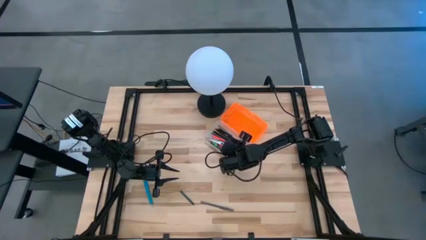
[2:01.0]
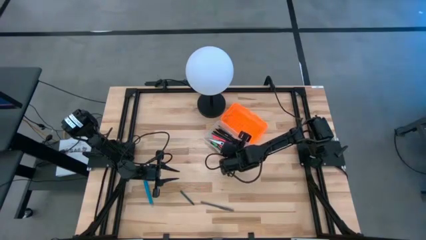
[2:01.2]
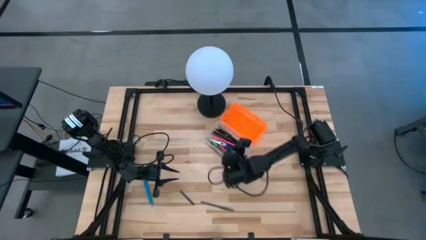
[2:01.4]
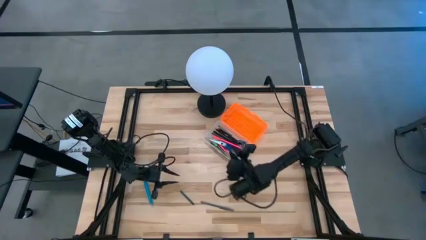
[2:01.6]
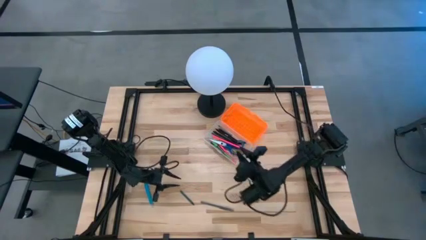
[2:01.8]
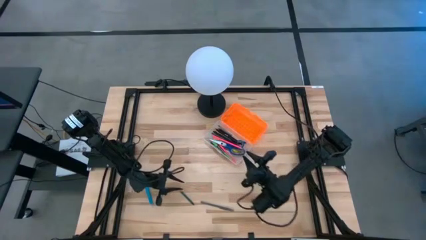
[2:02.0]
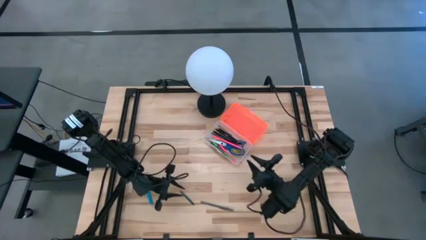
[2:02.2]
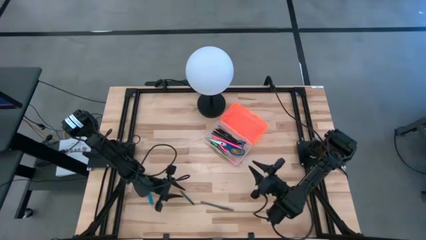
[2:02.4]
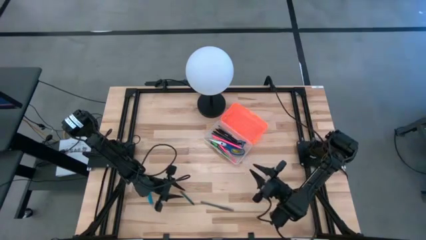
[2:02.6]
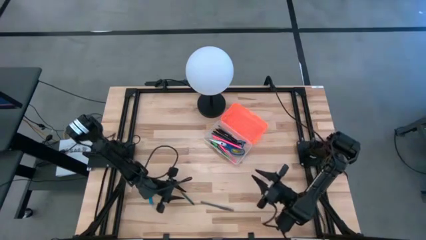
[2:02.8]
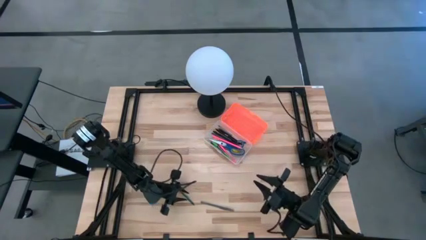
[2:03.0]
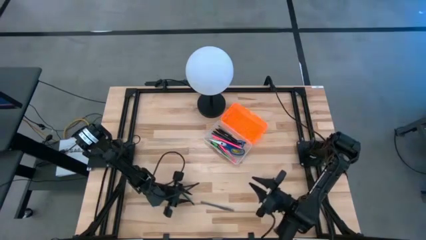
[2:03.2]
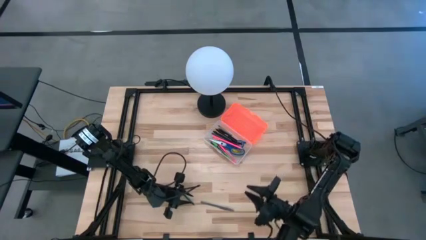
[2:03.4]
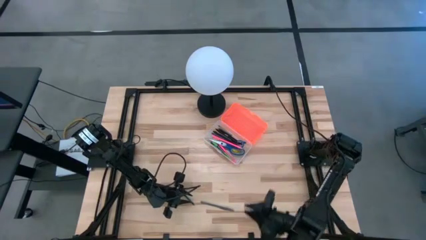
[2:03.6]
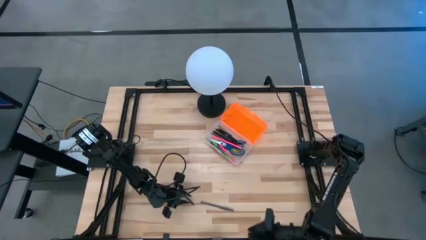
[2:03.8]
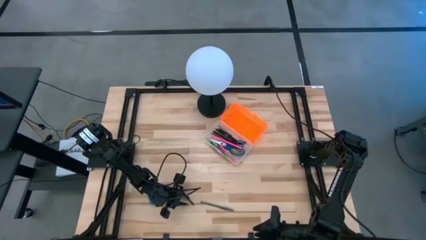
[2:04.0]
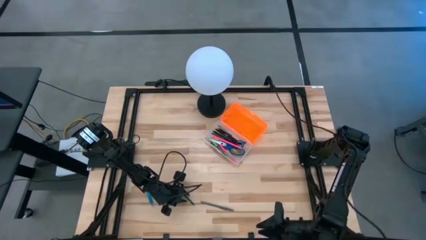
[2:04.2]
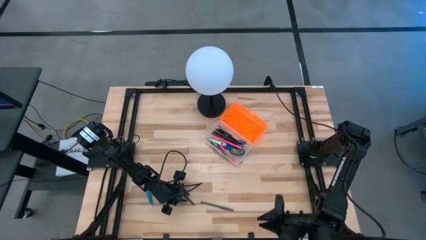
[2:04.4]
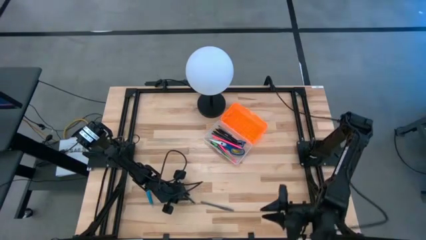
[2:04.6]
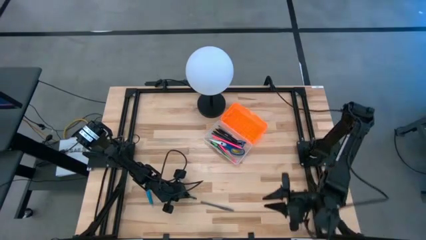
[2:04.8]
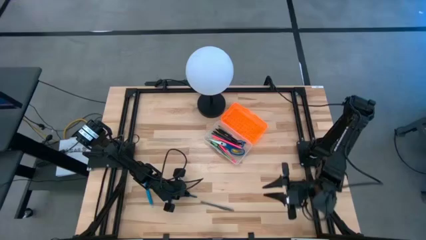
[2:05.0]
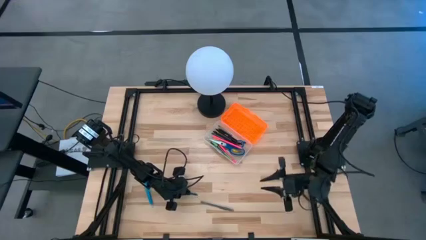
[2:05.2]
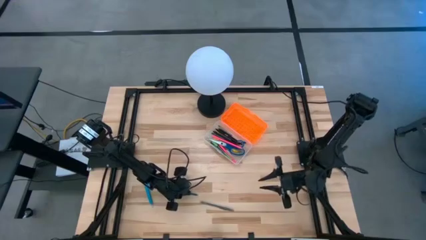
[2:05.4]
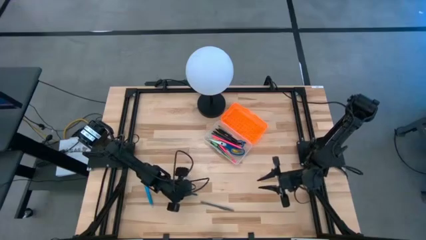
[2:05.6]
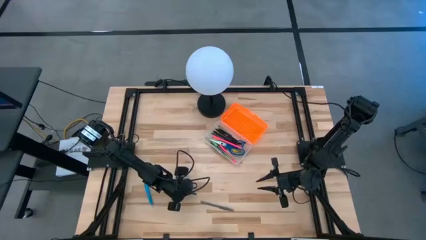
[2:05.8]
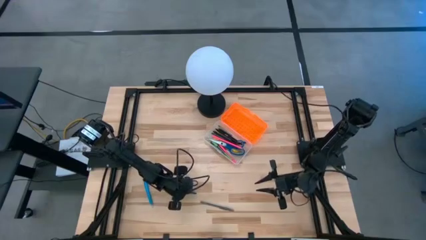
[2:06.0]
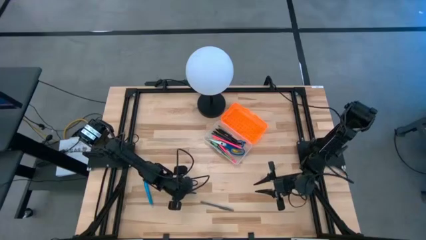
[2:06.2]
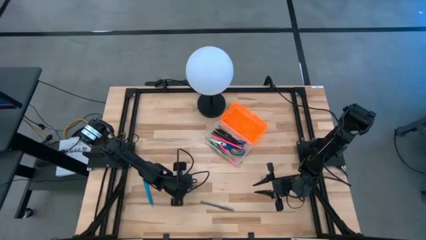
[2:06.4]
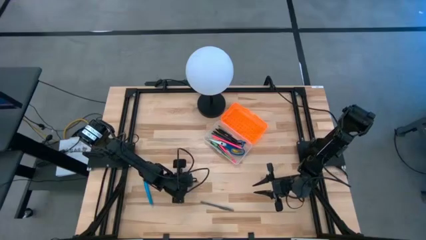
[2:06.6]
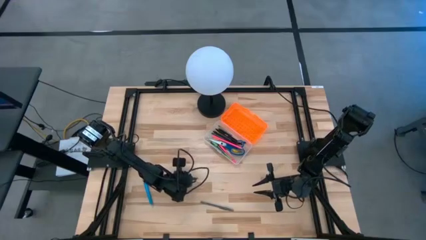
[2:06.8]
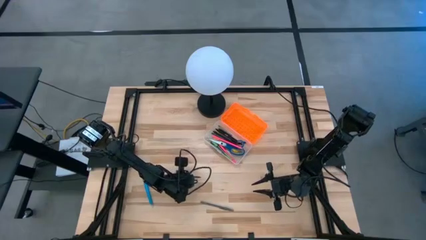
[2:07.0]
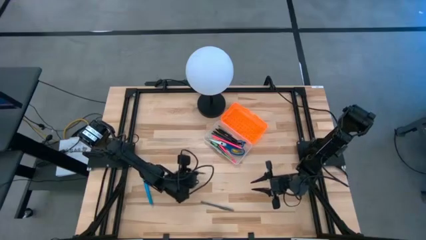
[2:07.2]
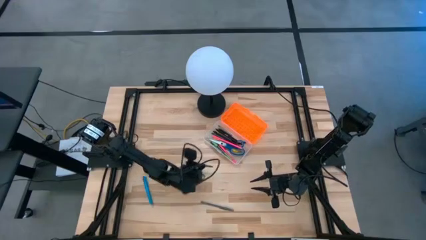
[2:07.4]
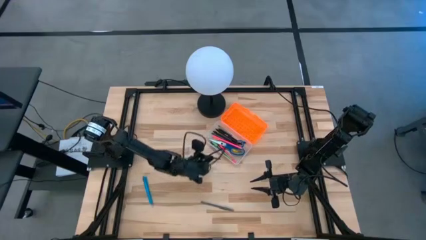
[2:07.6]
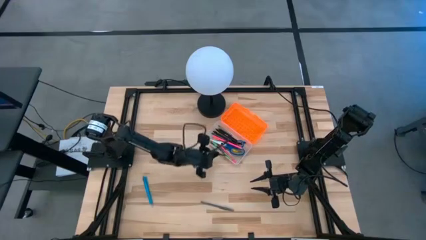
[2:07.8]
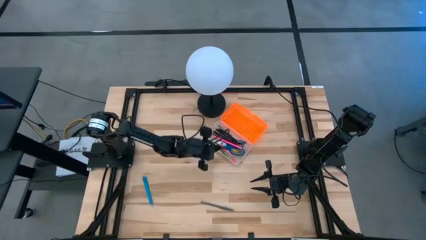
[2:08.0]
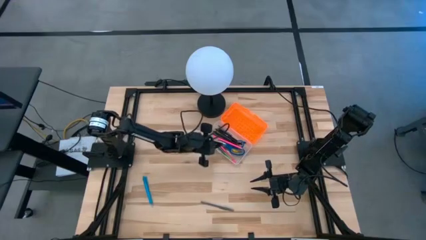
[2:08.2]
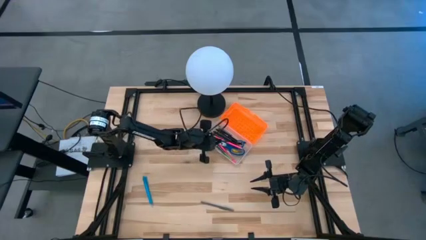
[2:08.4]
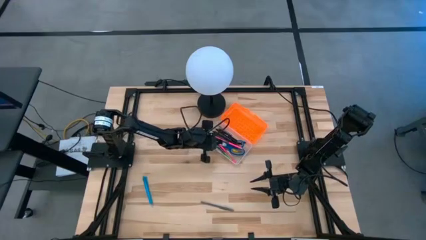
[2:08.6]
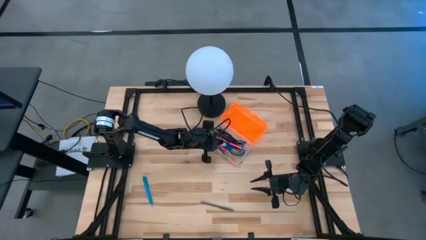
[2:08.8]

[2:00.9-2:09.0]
Task: Pick & place school supplies into a supply box
Put the dark green crayon into the orange supply box

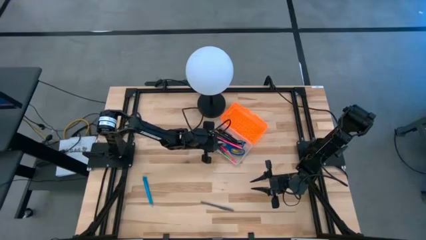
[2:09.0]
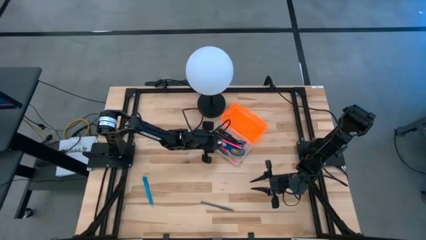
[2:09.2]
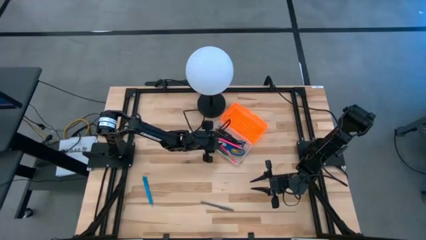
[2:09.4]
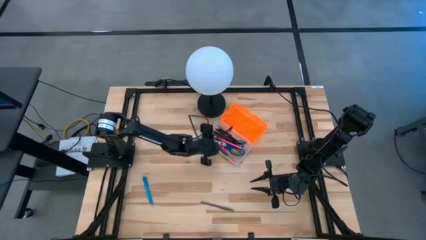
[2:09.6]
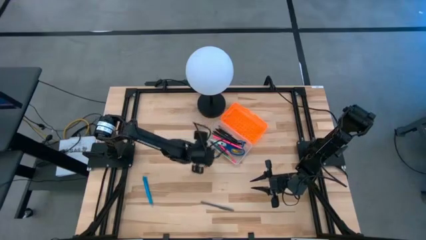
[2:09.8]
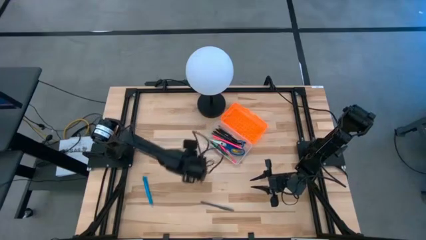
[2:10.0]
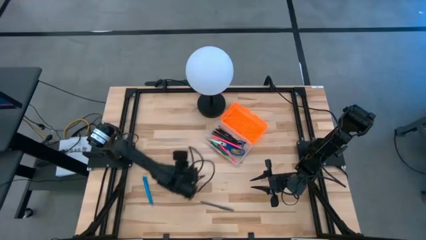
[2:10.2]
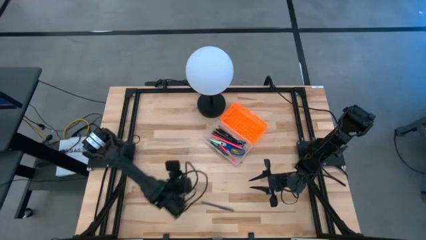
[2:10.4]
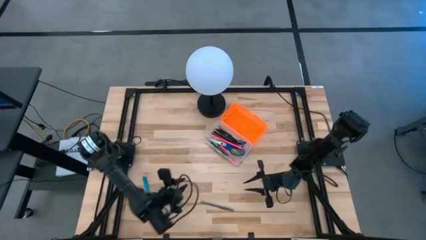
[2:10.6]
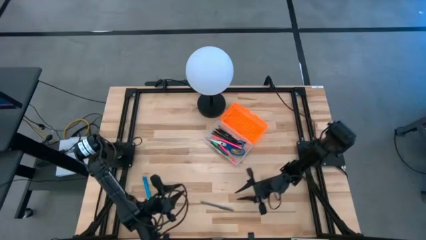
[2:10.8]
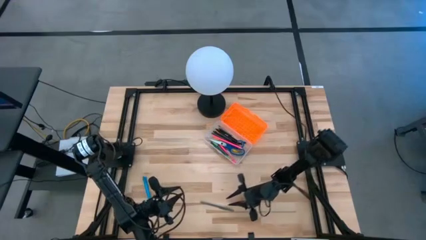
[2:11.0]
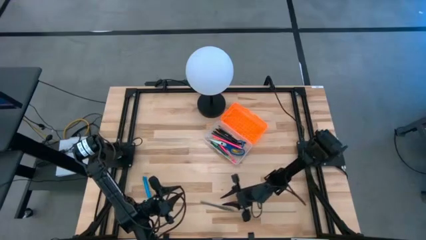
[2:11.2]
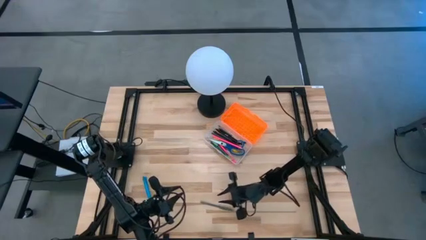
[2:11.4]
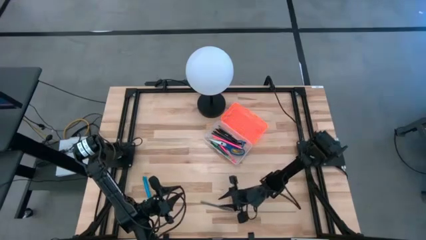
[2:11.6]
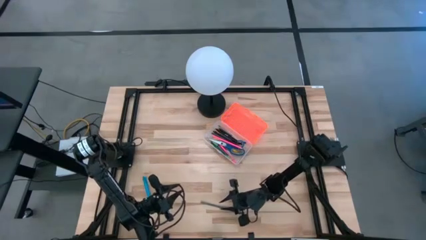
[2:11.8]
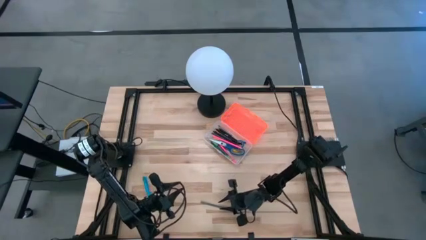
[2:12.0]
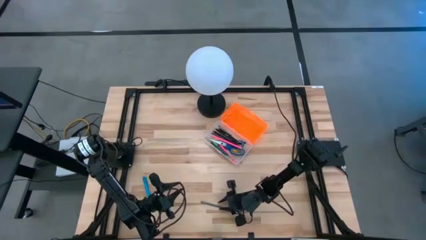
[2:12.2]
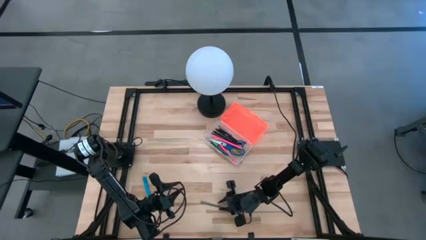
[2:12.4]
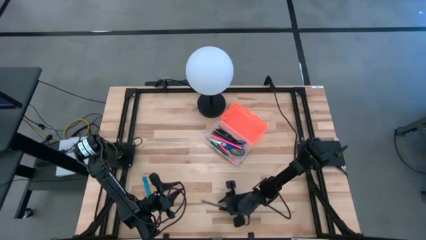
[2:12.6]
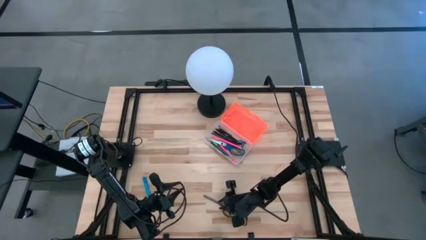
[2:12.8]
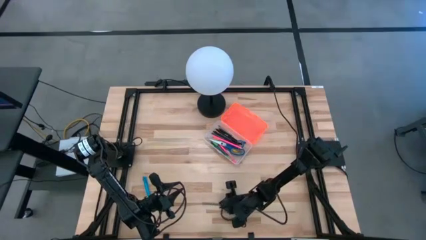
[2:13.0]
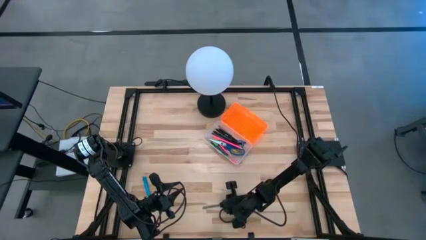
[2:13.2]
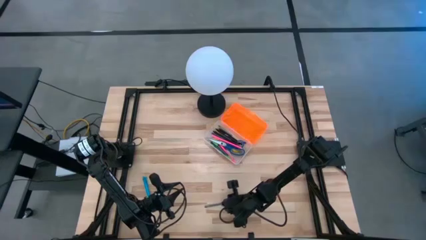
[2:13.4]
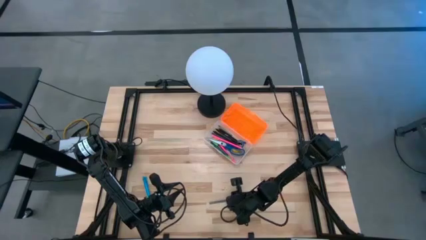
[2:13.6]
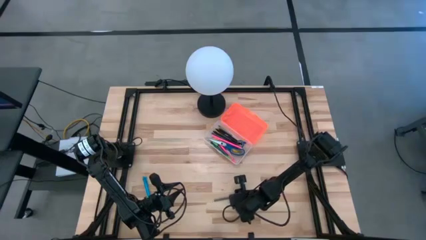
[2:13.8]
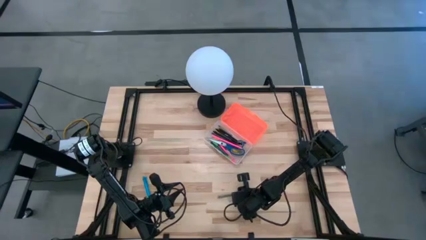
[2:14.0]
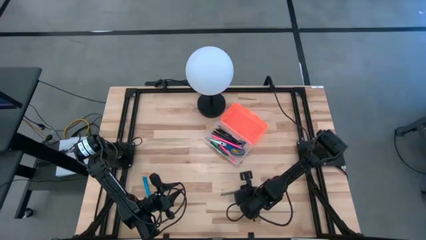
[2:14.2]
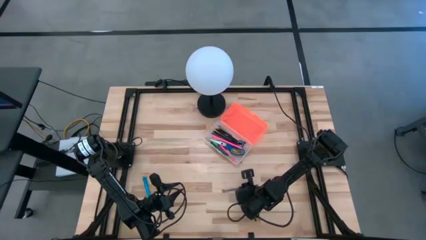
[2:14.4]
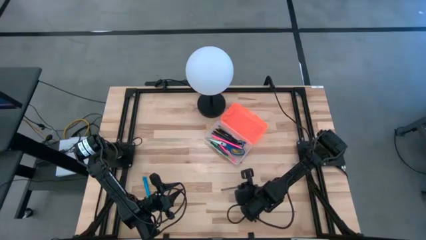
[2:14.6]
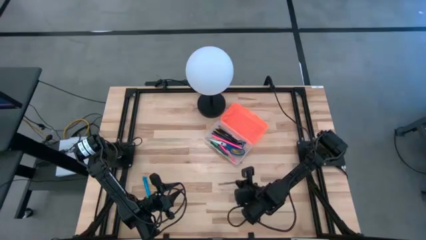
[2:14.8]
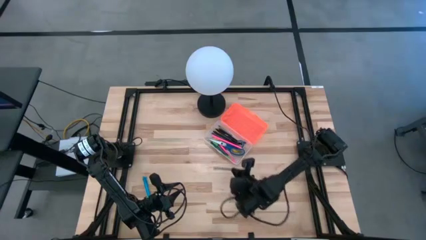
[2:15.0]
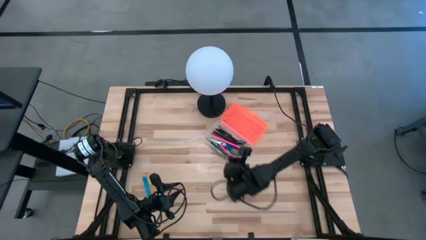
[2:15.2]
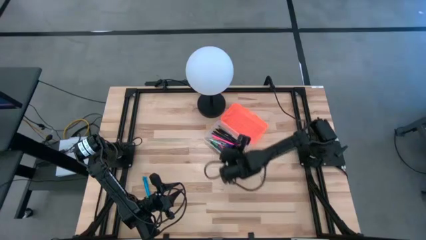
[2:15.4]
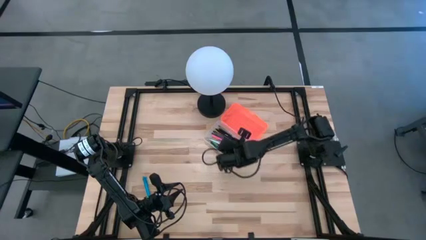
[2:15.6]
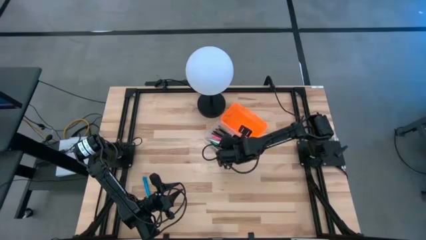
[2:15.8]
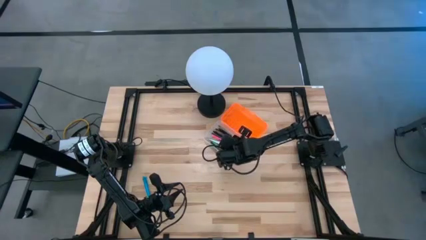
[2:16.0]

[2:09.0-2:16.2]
Put the gray pen into the orange supply box

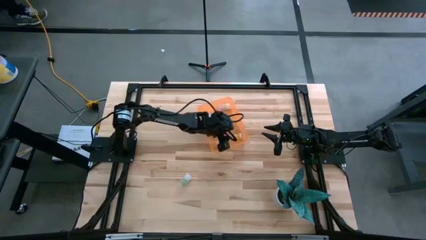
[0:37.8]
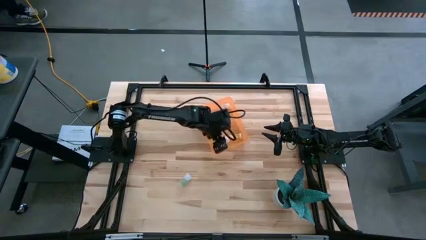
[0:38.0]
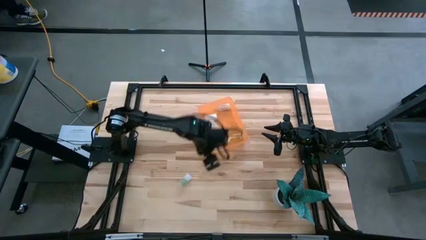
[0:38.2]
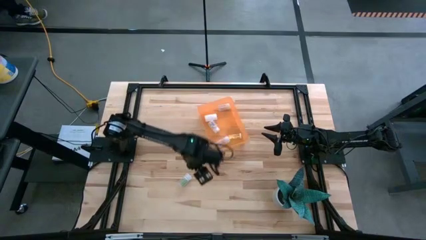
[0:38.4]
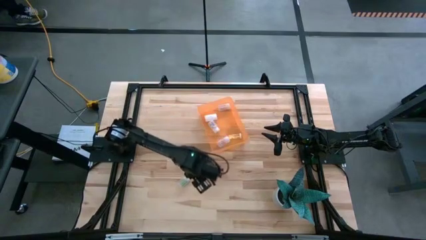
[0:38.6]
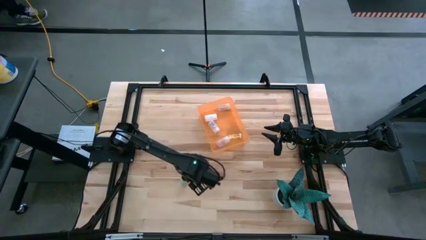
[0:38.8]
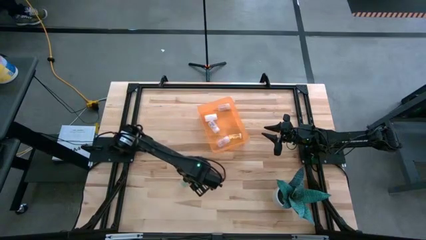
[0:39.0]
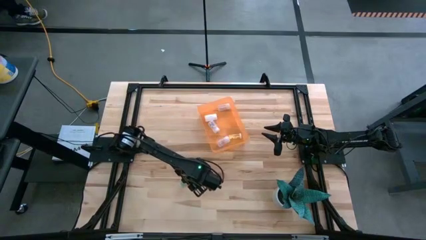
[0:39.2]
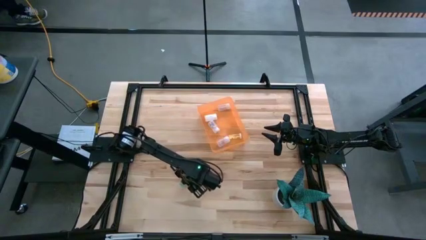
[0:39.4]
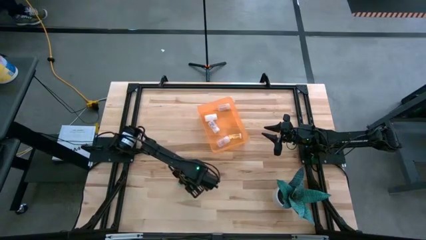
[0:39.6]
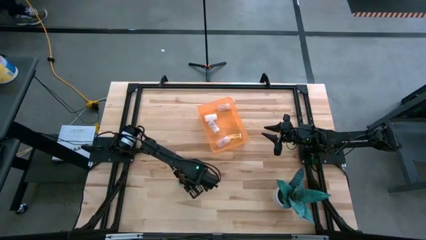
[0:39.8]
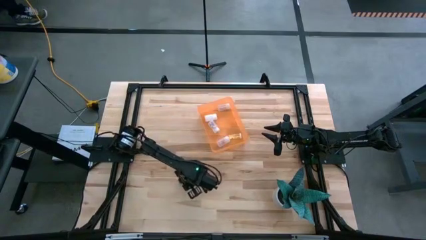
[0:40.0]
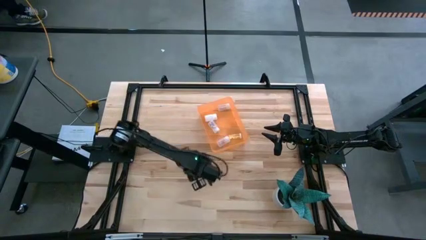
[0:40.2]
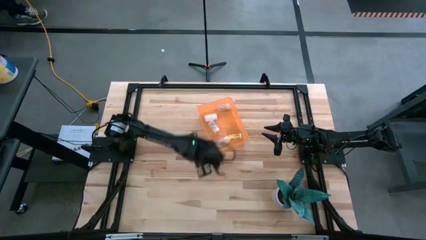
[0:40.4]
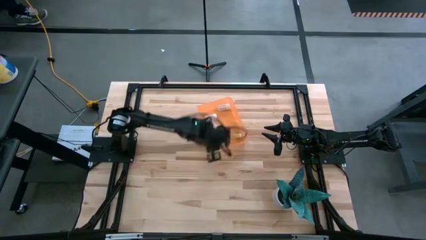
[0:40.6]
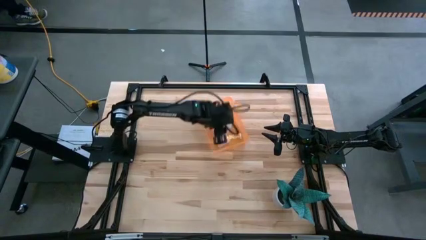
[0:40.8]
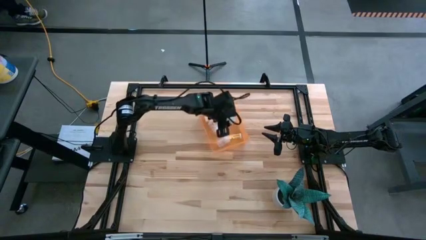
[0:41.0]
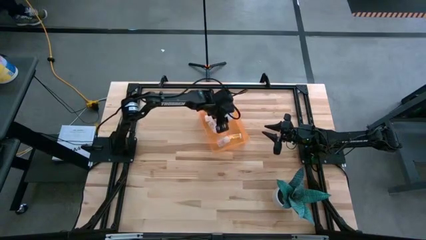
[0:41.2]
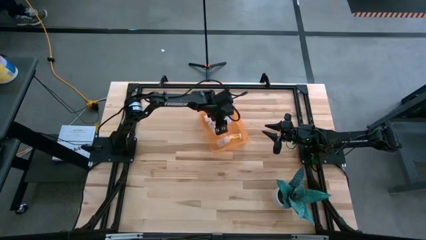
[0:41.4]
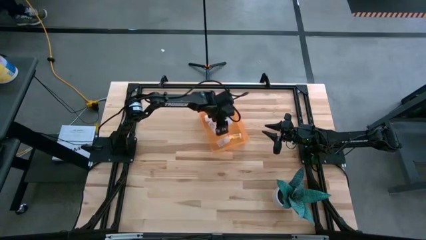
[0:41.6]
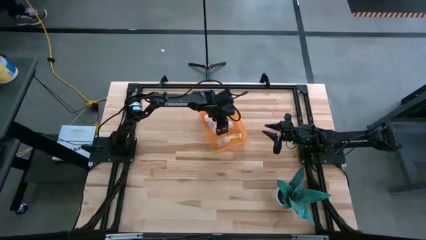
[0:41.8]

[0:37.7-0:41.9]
Task: Pick and place pill bottles into a basket
Put the transparent pill bottle into the orange bin
